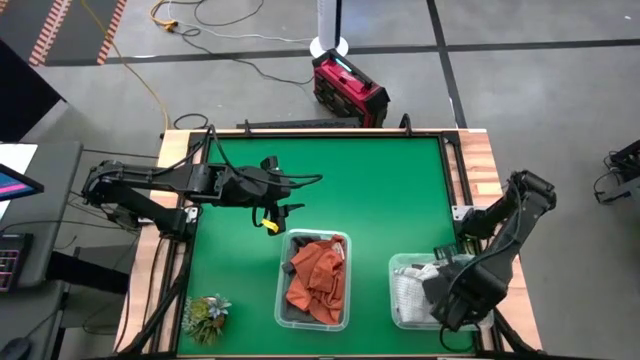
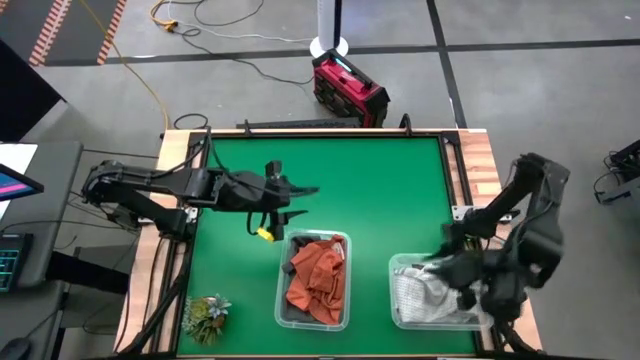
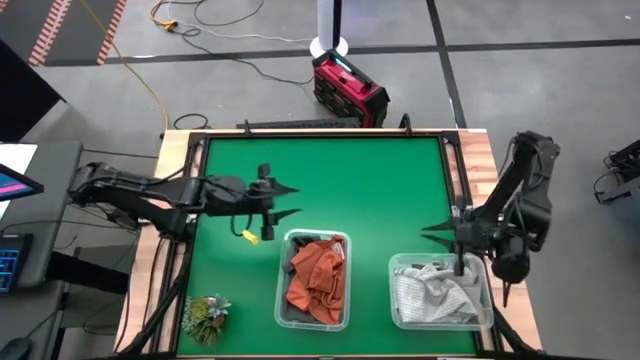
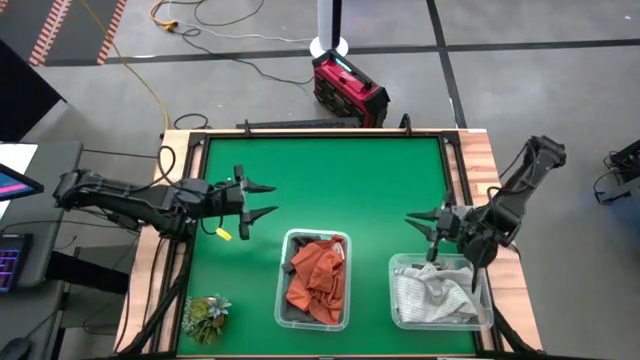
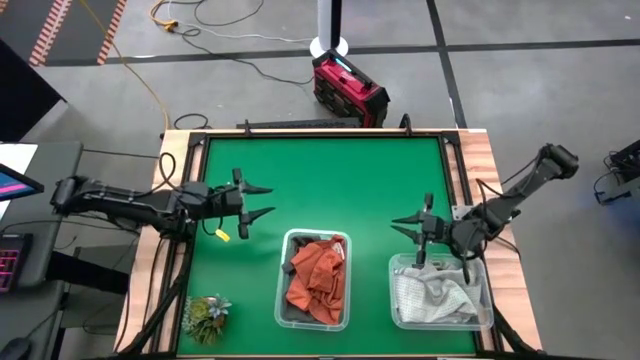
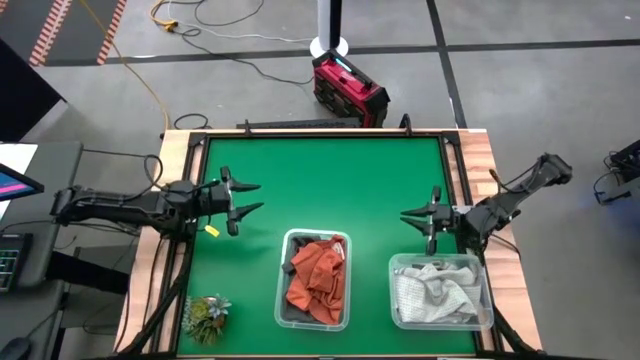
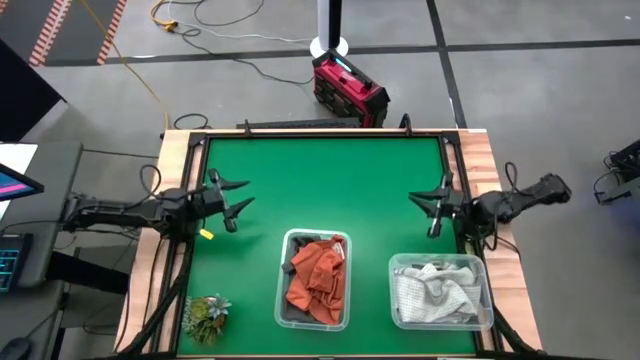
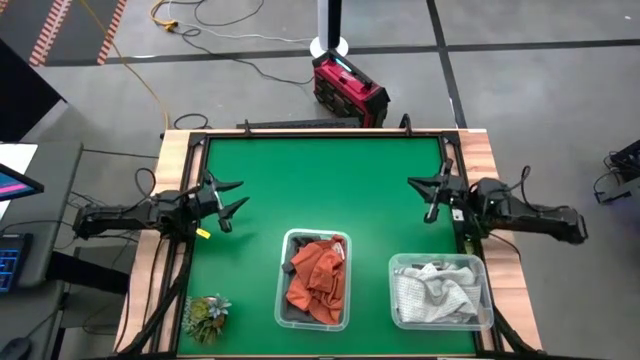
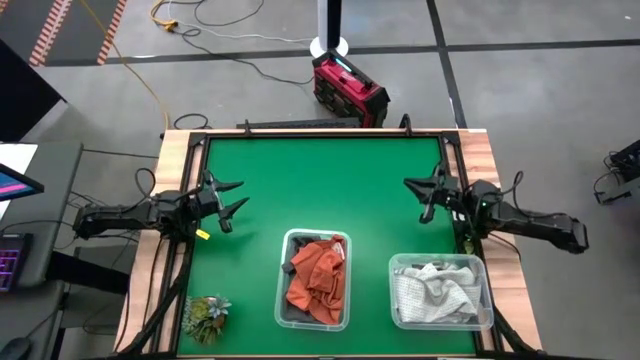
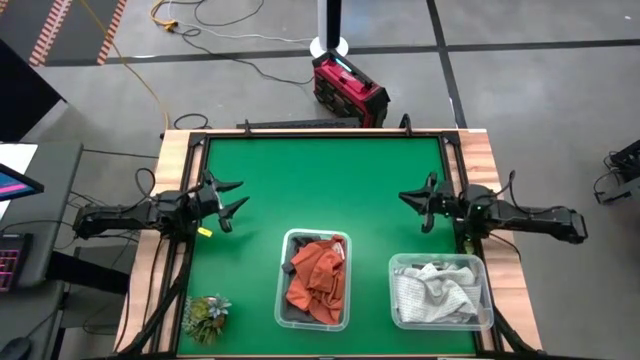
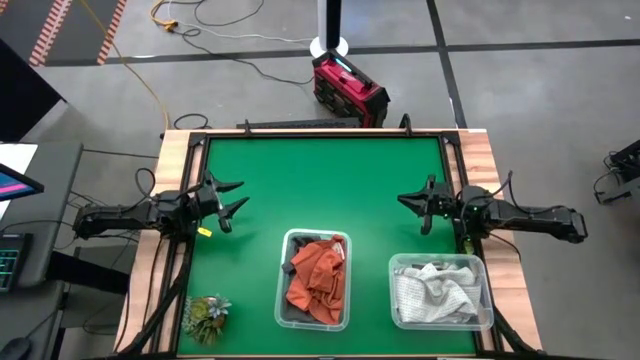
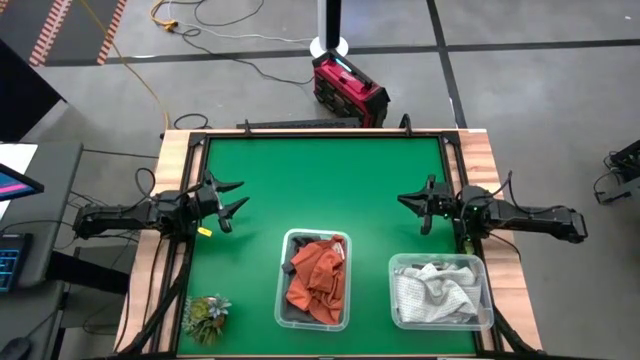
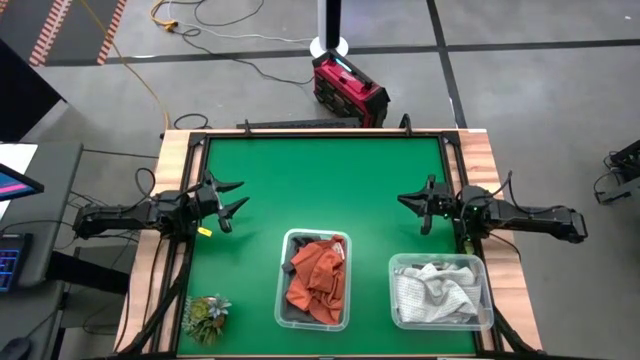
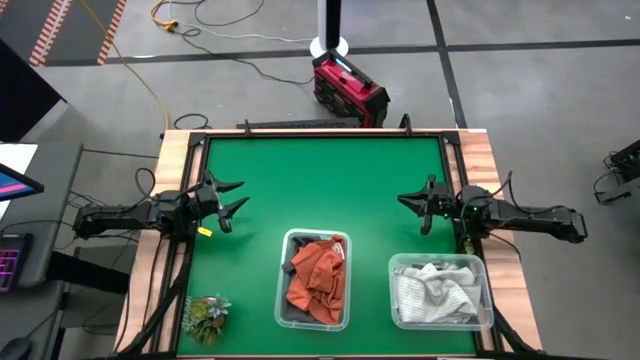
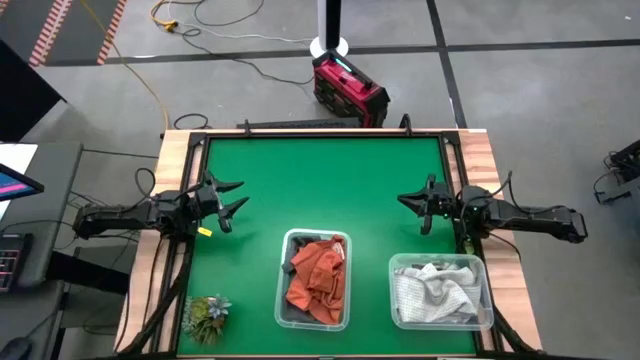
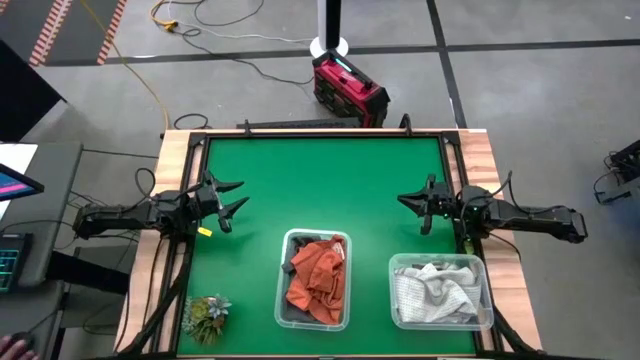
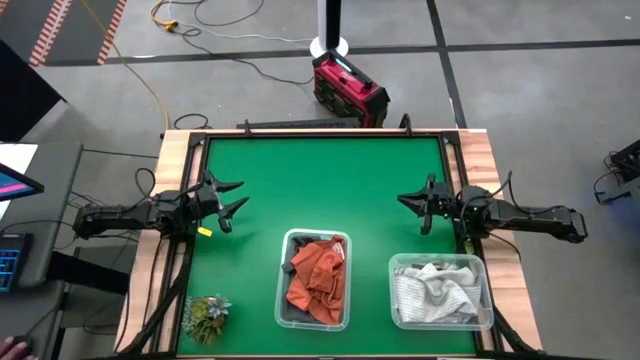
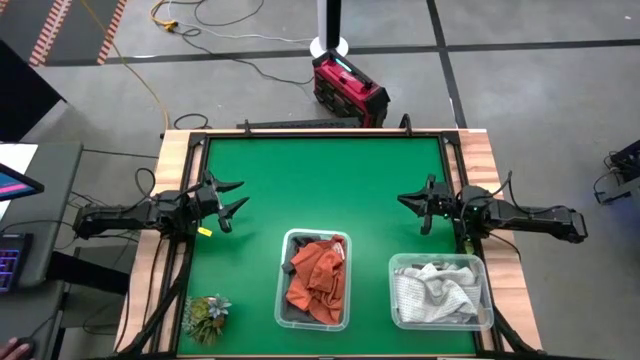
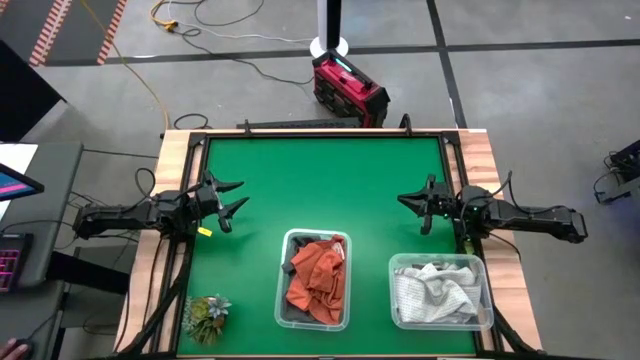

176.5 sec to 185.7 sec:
Task: Sort towels by color in basket
Return to Home Position

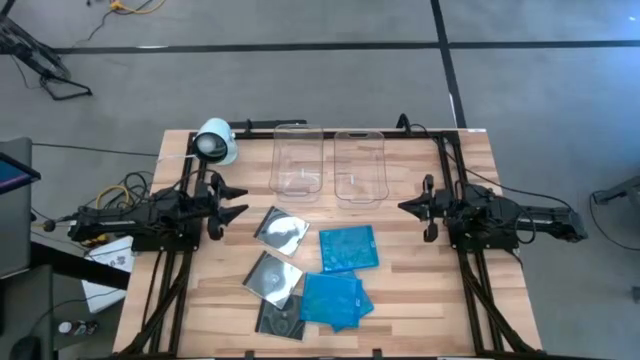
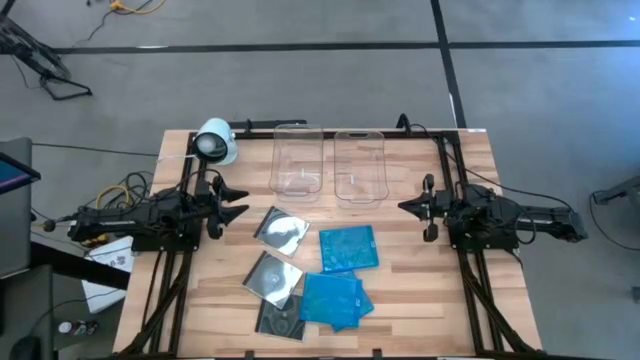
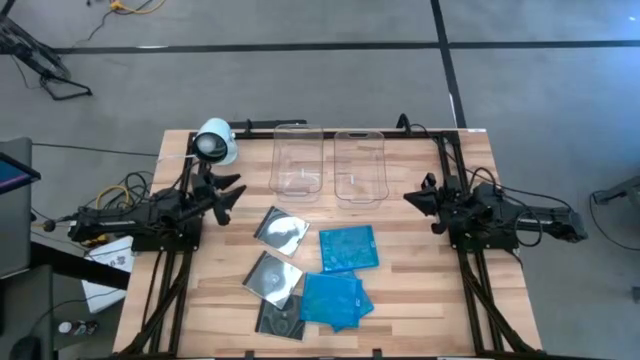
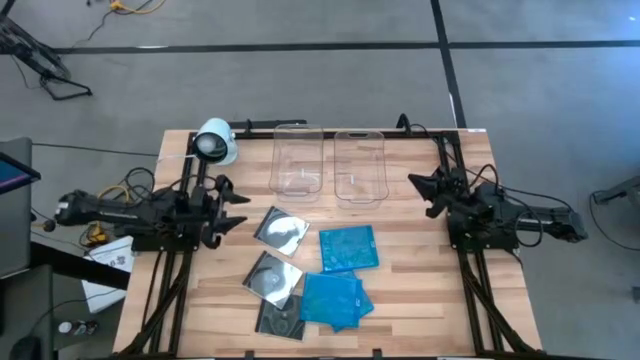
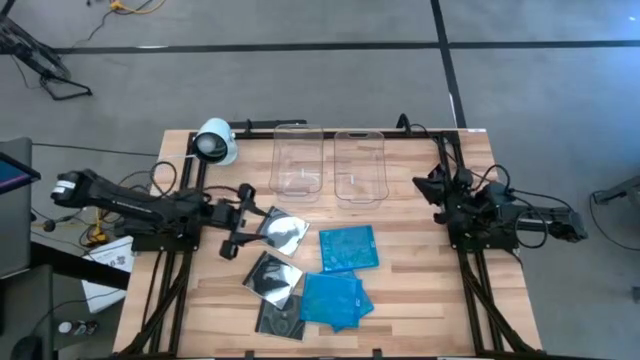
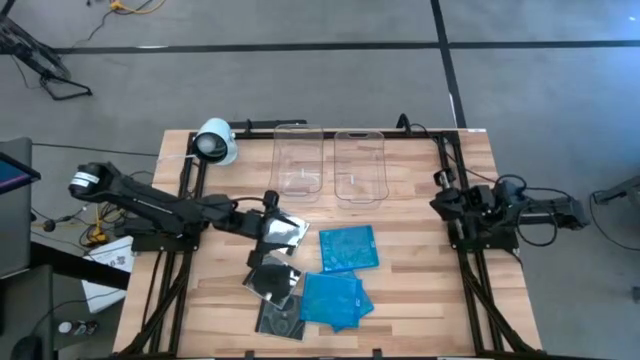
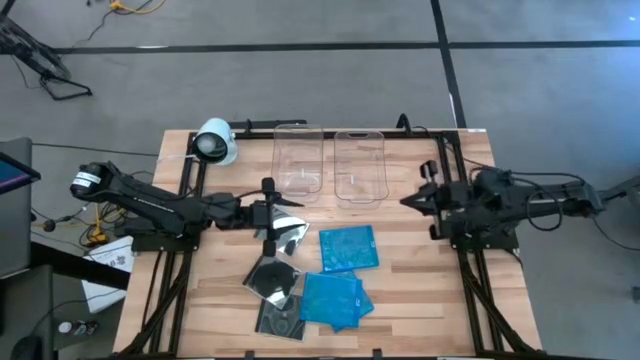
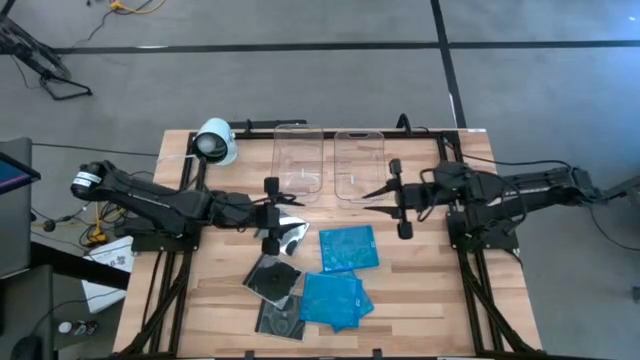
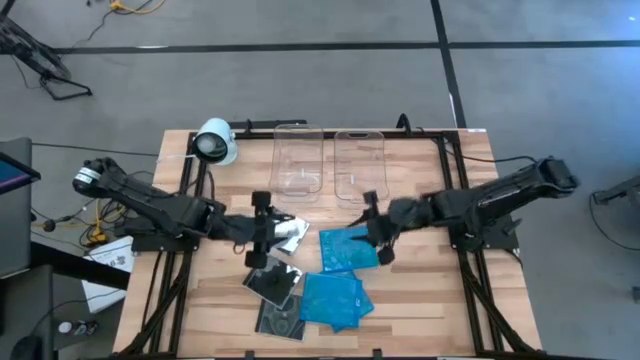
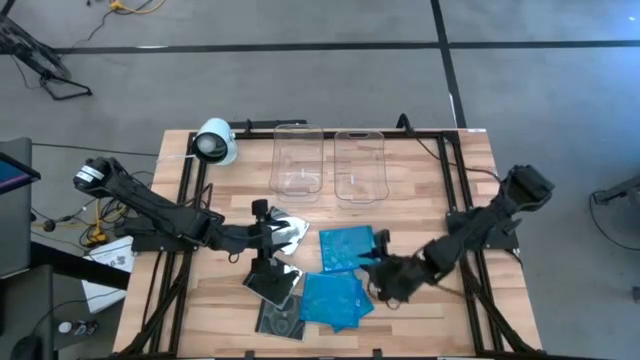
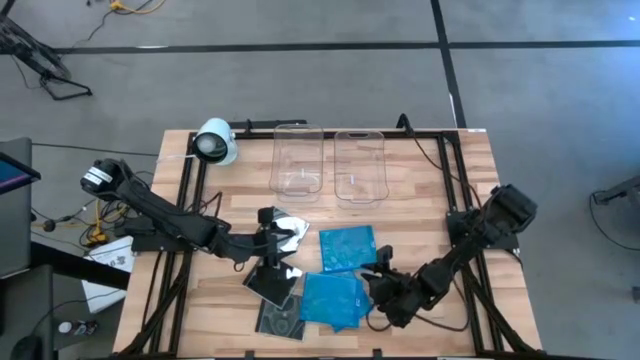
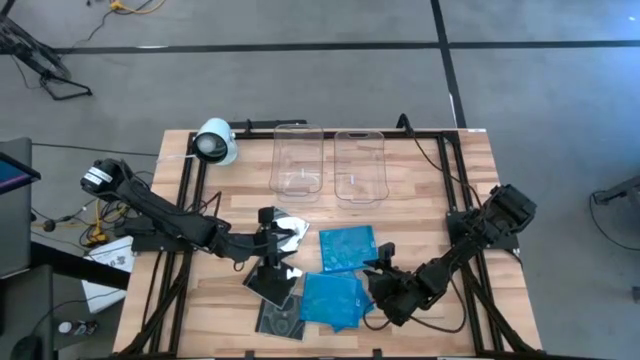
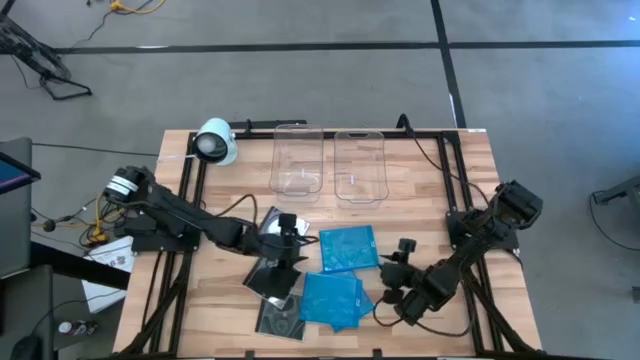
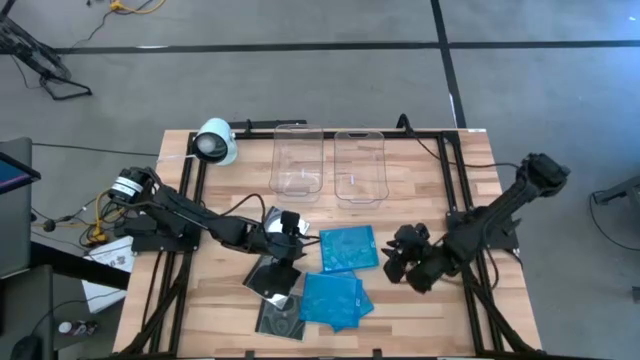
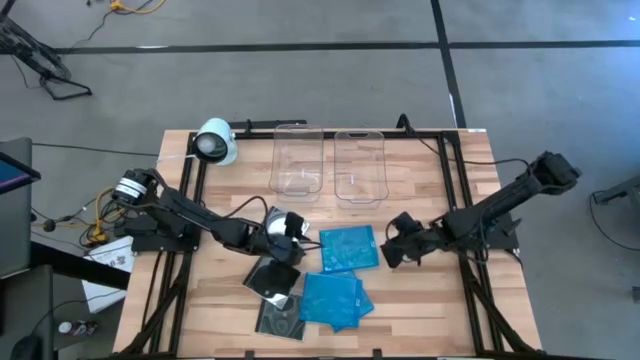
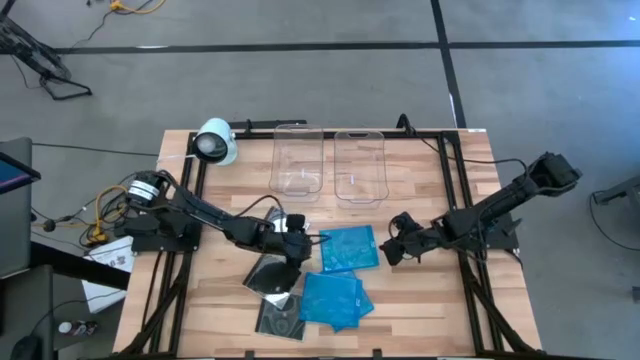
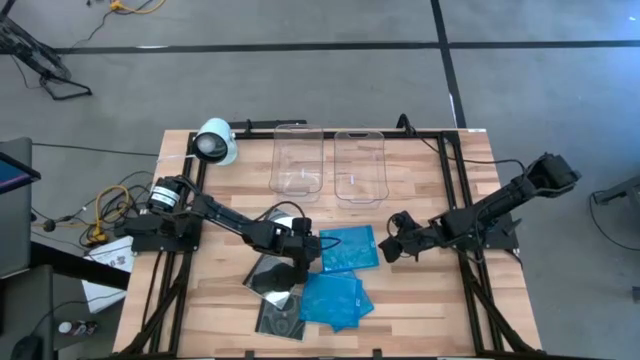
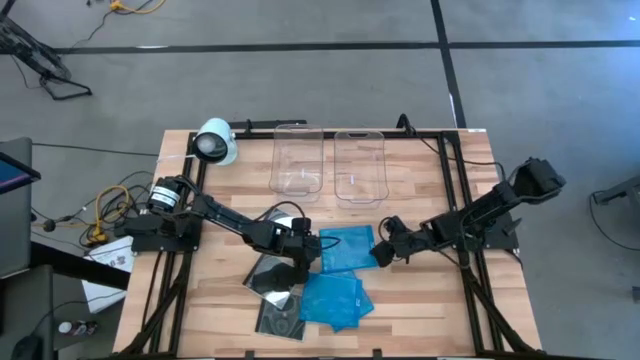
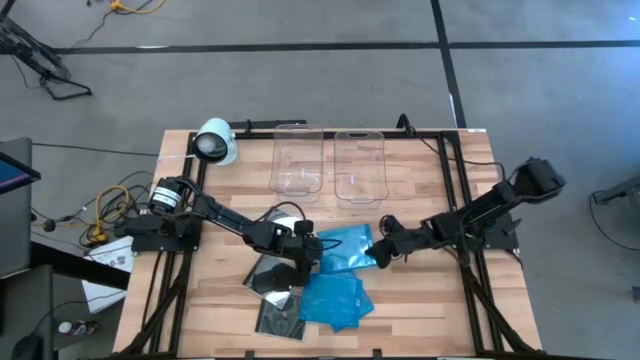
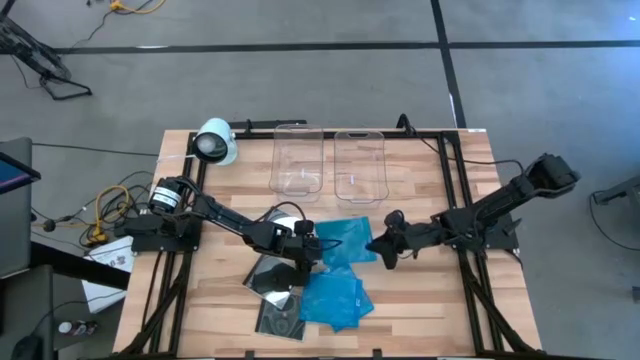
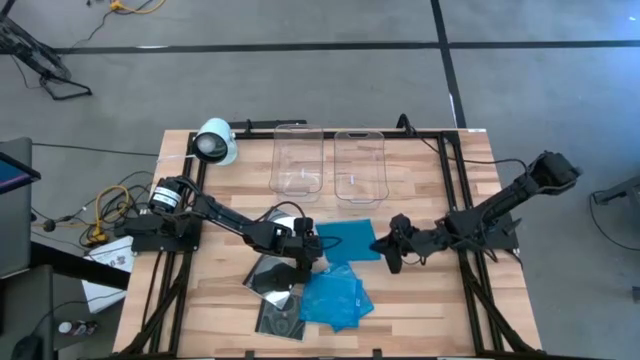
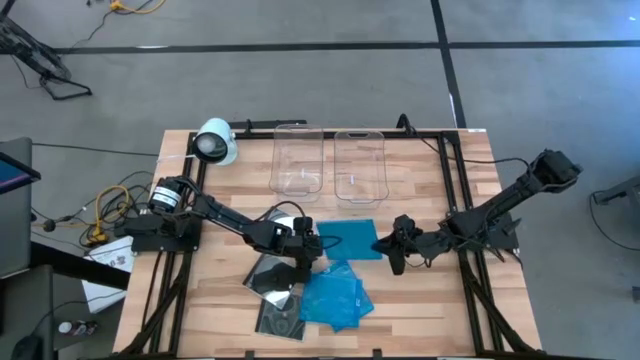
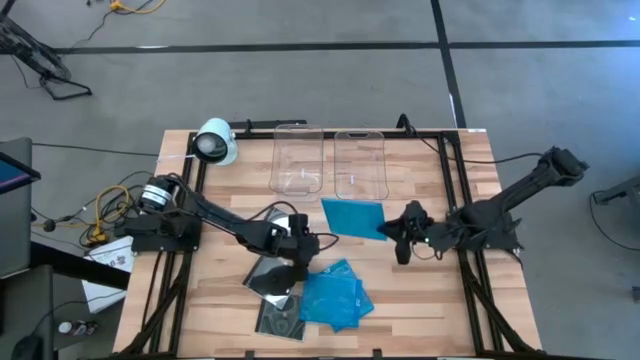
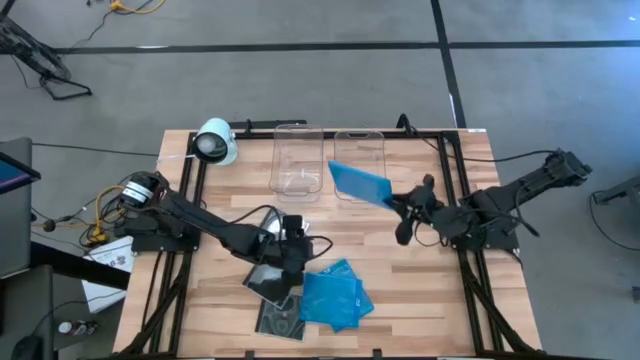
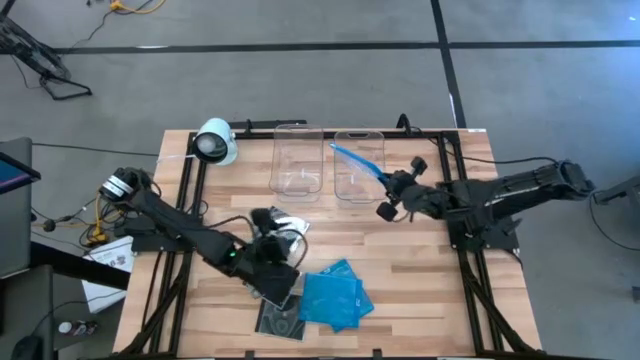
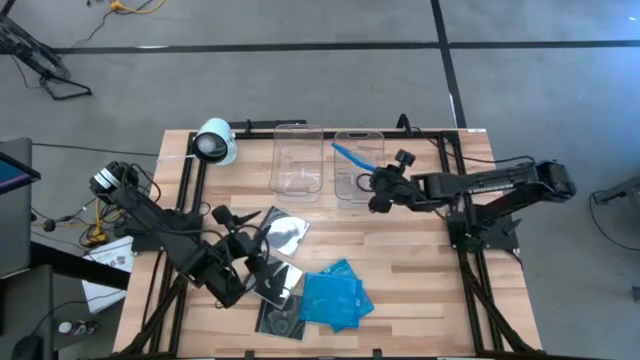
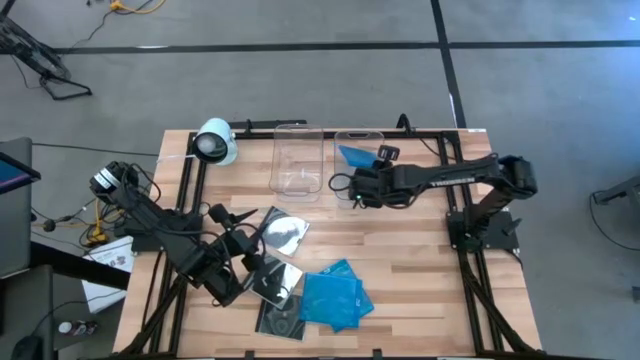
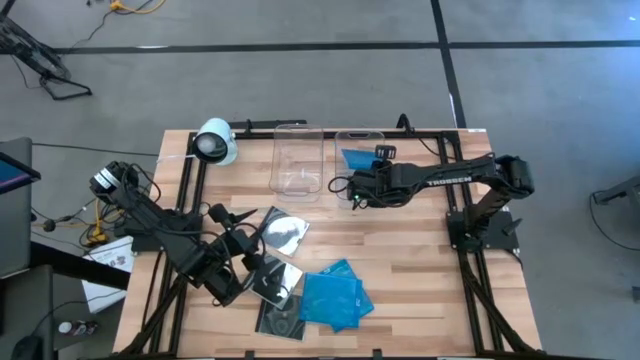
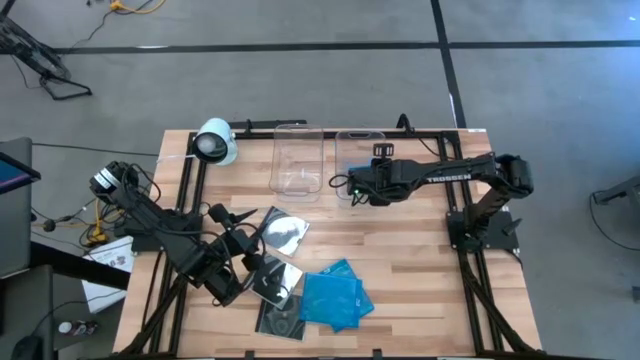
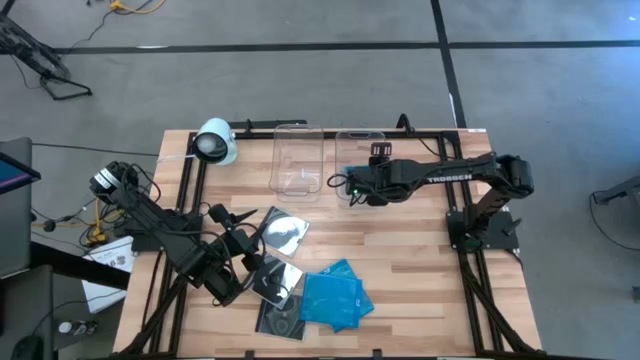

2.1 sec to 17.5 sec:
Task: Pick & place jewel cases by type
Put the top blue CD case into the right transparent bin
